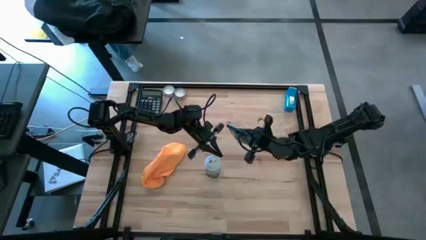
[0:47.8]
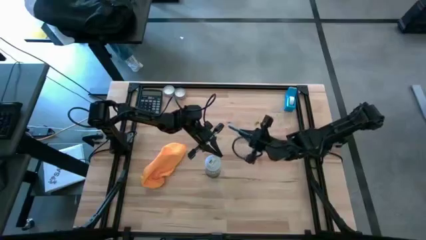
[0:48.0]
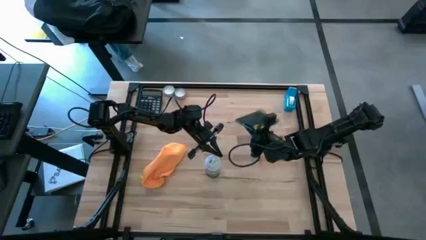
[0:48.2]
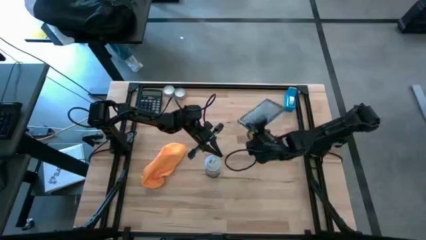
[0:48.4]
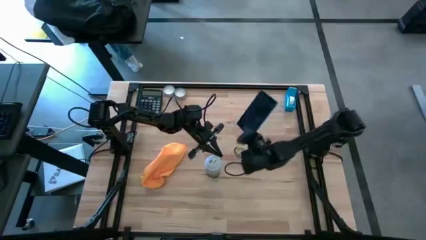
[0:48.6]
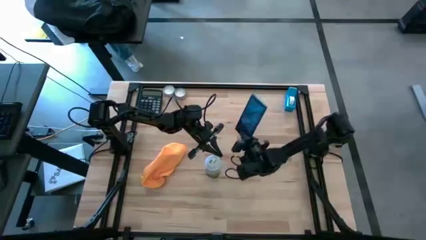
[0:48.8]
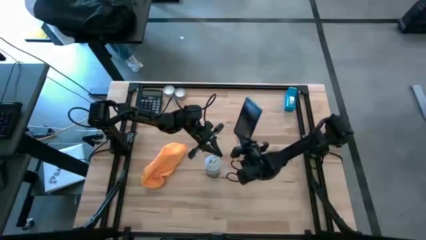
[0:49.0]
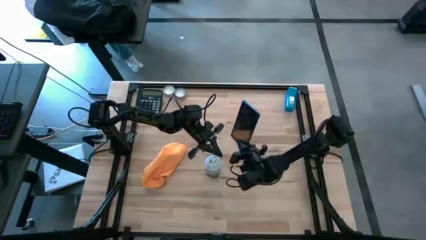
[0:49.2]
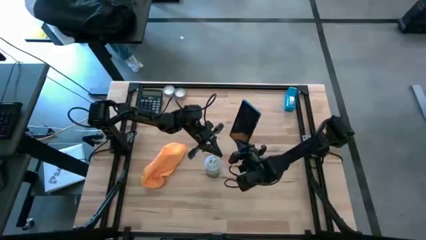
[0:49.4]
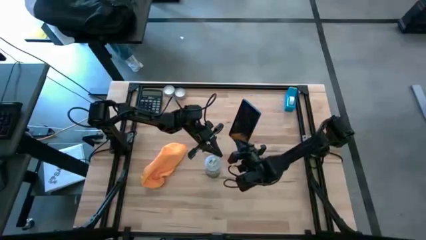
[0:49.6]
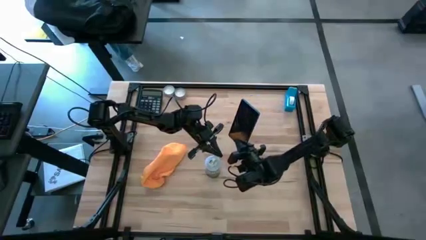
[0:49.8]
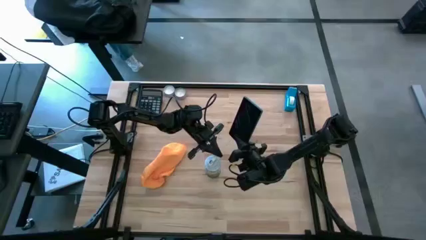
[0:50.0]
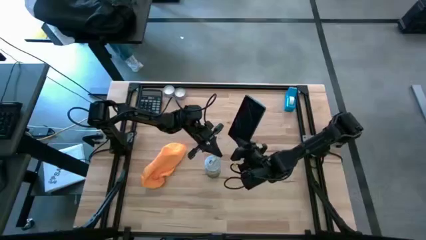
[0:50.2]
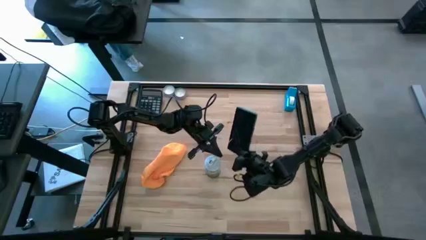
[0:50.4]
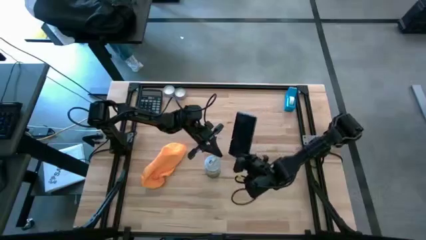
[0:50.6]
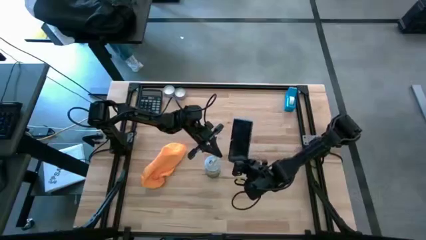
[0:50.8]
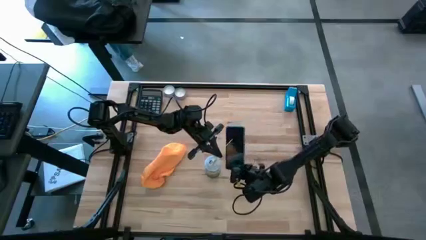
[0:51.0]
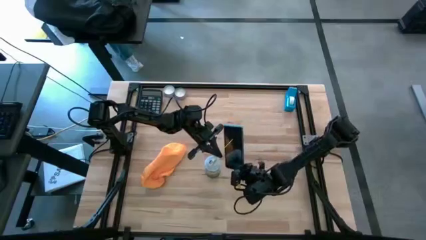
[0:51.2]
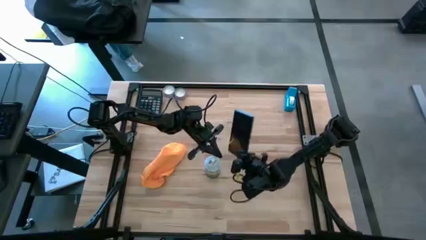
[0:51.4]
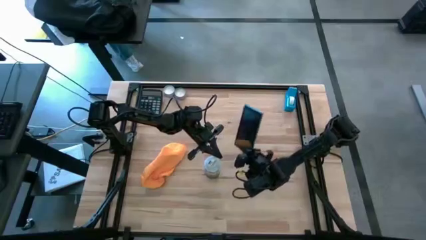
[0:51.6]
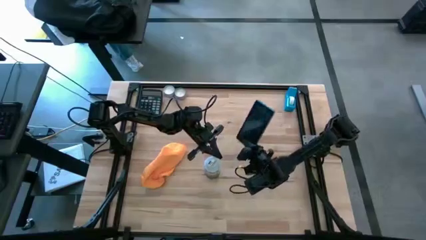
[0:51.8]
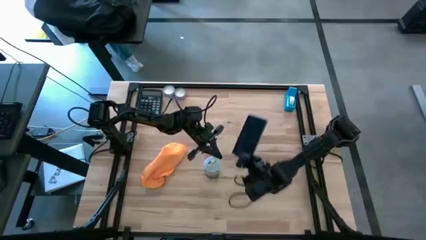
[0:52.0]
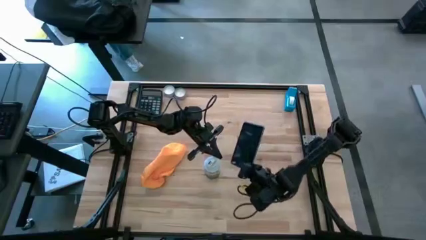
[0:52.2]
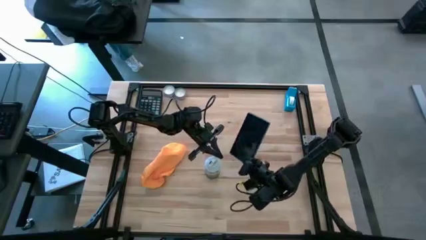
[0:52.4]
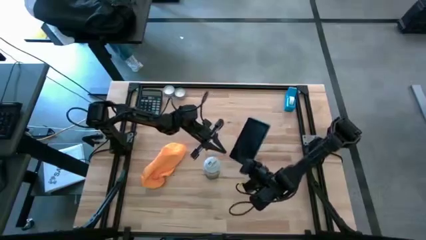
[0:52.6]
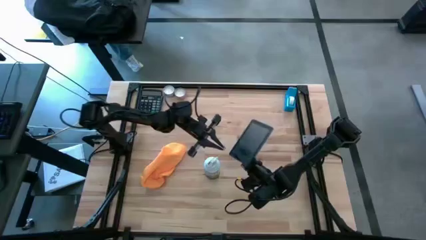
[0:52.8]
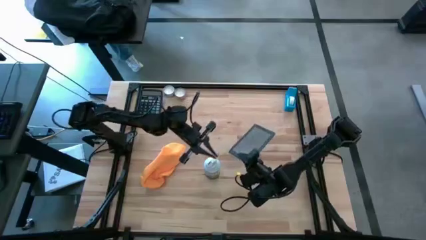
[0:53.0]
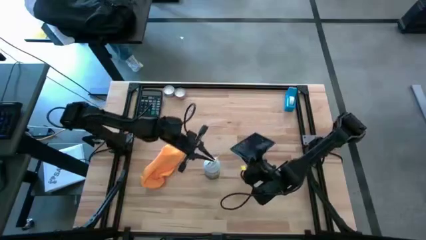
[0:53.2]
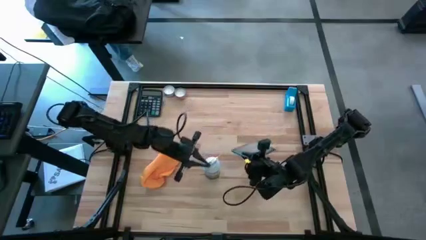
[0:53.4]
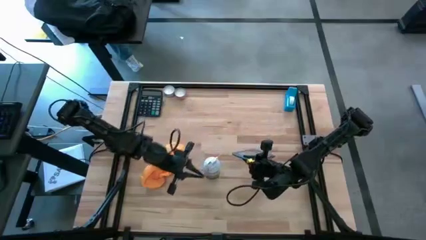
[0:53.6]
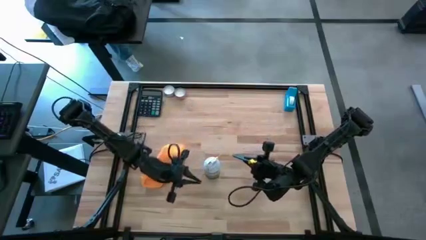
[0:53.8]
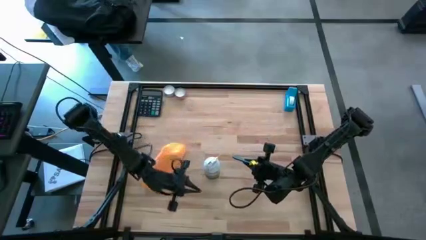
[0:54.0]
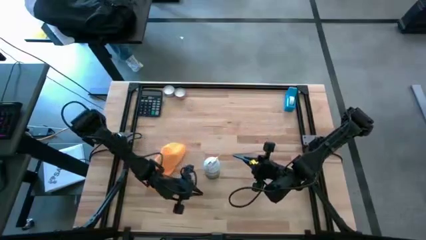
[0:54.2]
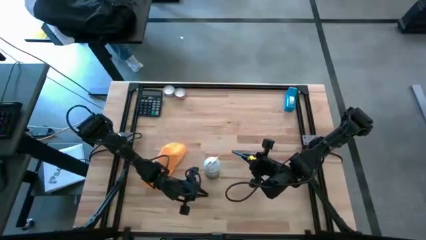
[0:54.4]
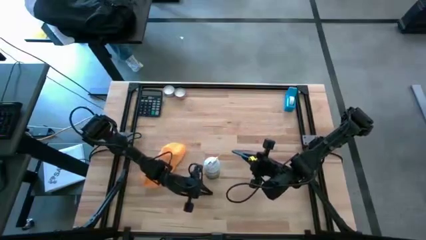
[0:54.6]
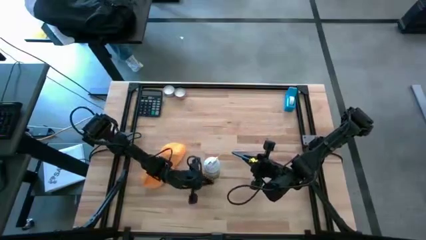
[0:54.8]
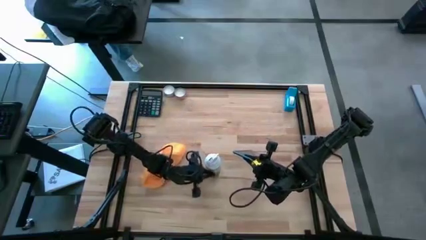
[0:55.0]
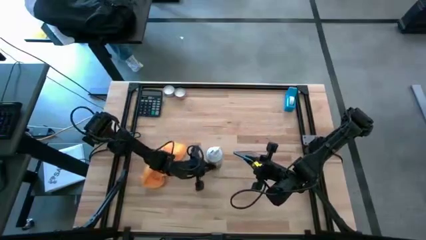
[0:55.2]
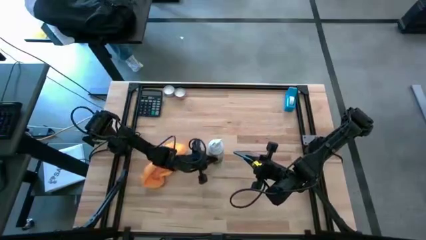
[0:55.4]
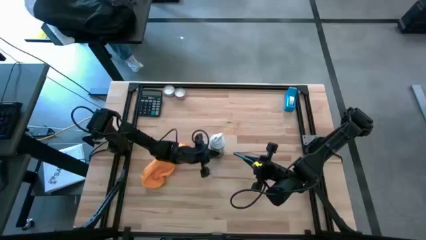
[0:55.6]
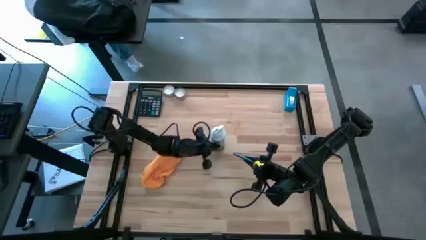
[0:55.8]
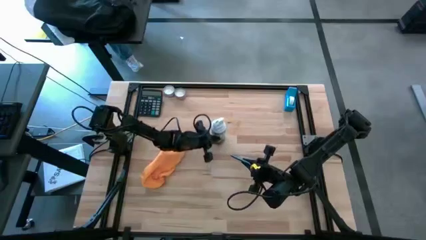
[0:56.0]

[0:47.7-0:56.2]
Task: Apply microfiber cloth
Spray the front of the blue tablet using the white spray bottle

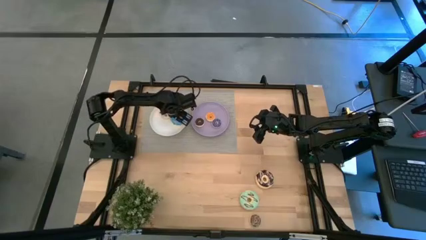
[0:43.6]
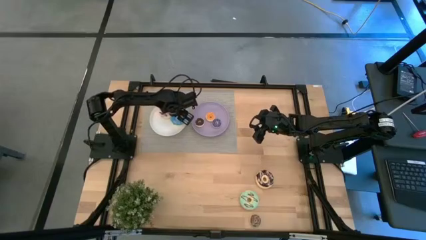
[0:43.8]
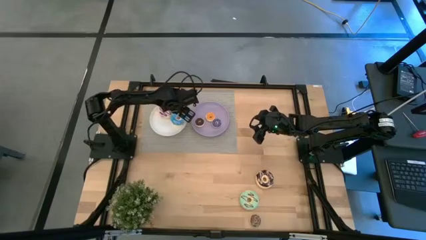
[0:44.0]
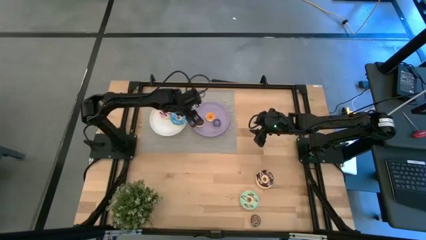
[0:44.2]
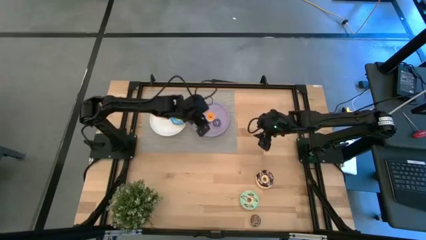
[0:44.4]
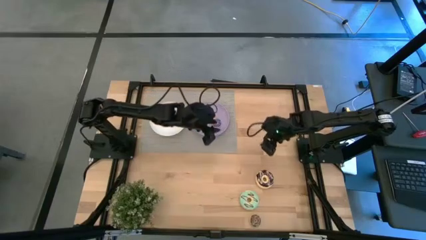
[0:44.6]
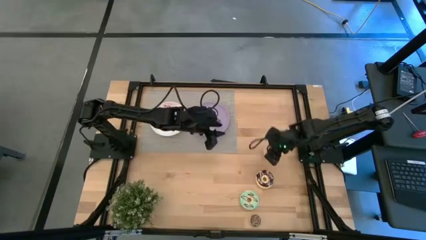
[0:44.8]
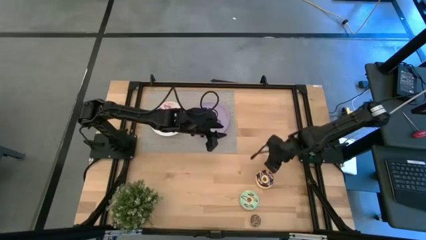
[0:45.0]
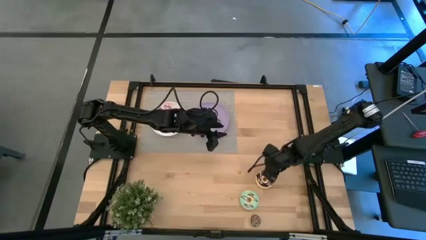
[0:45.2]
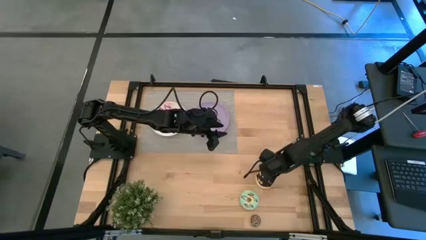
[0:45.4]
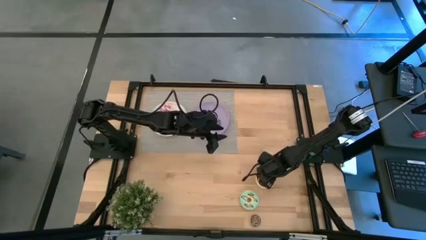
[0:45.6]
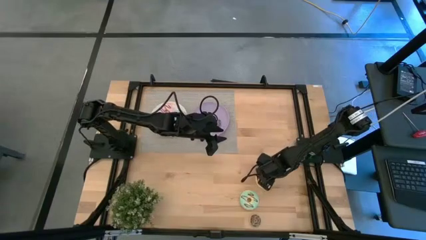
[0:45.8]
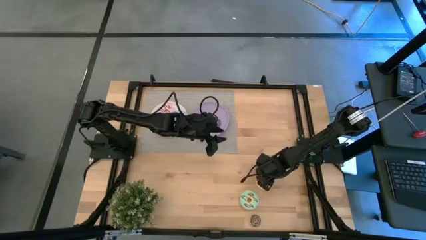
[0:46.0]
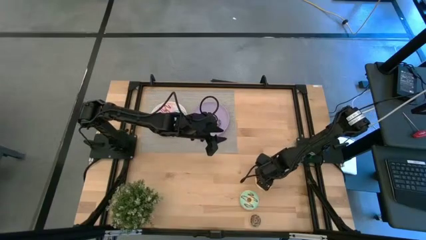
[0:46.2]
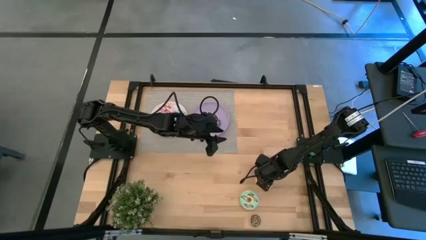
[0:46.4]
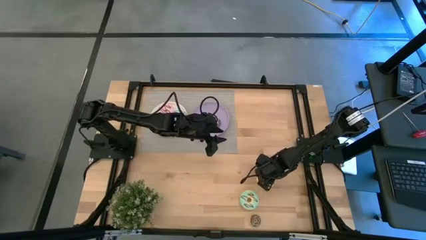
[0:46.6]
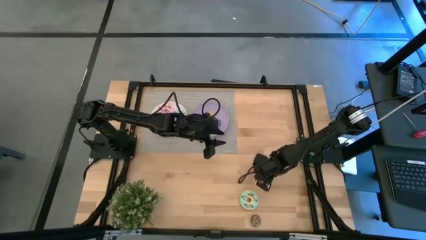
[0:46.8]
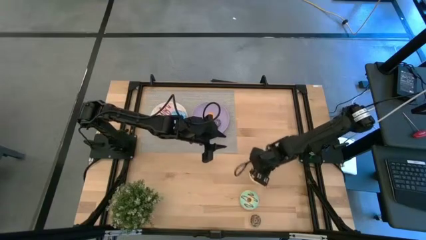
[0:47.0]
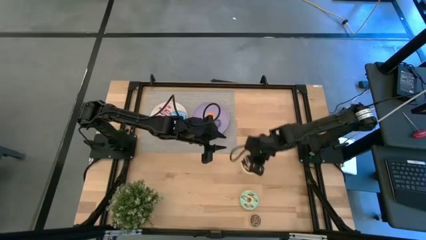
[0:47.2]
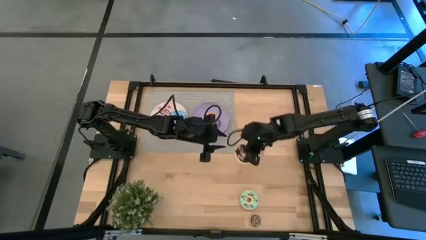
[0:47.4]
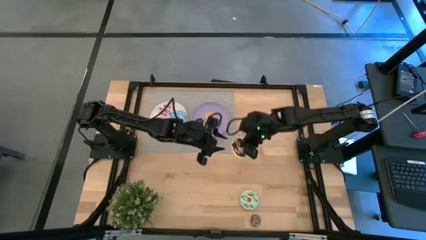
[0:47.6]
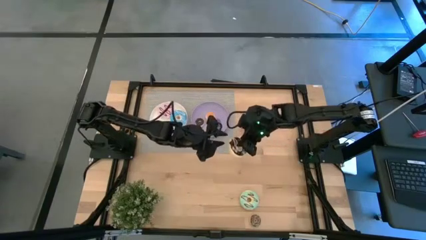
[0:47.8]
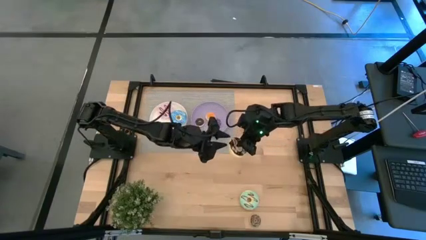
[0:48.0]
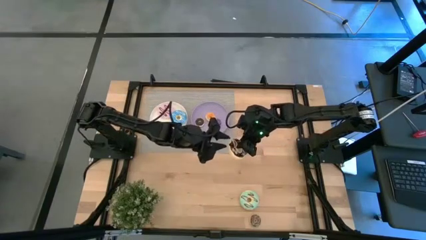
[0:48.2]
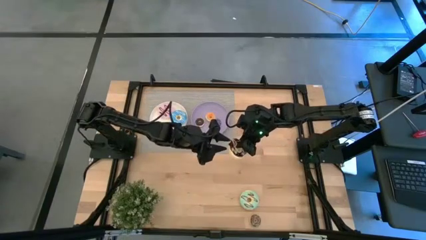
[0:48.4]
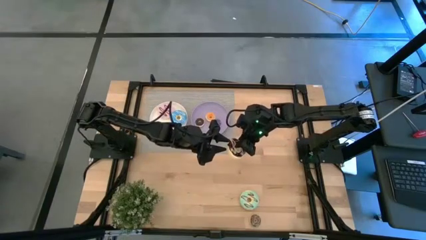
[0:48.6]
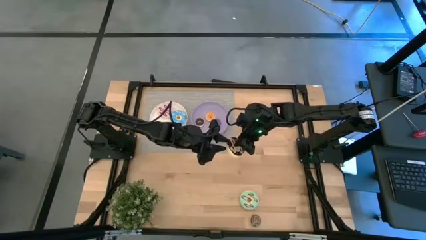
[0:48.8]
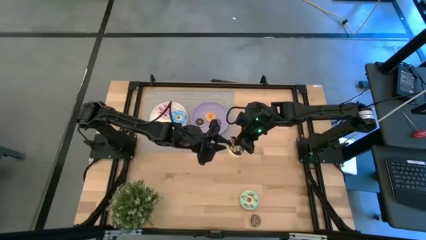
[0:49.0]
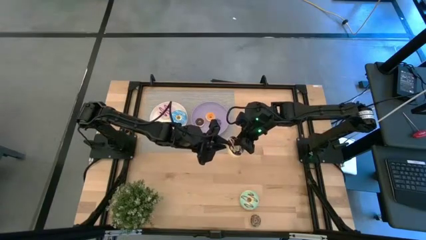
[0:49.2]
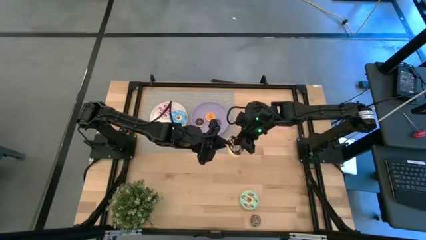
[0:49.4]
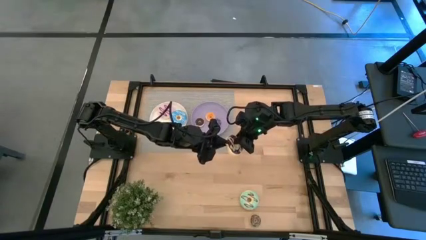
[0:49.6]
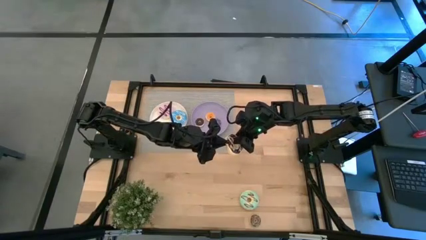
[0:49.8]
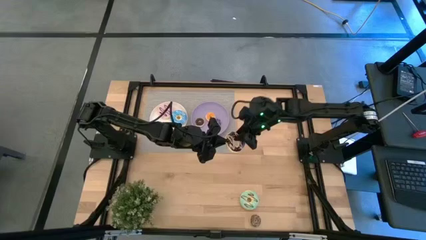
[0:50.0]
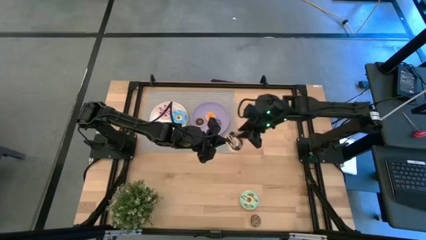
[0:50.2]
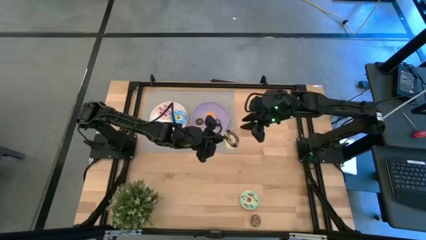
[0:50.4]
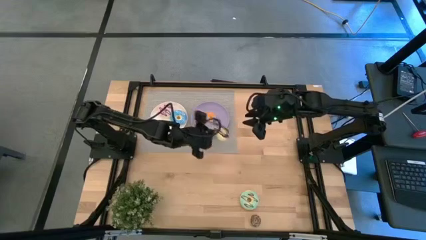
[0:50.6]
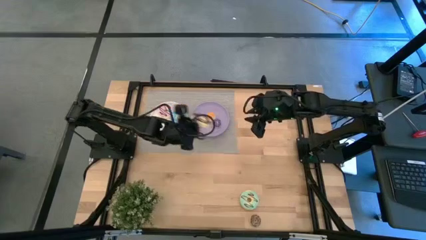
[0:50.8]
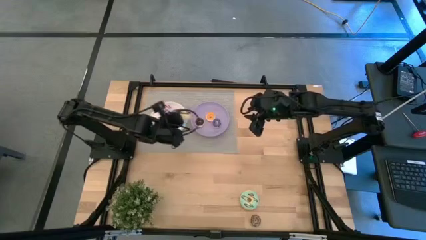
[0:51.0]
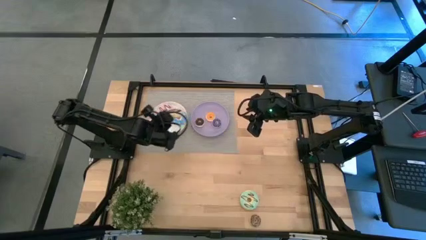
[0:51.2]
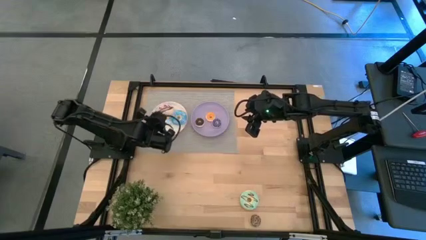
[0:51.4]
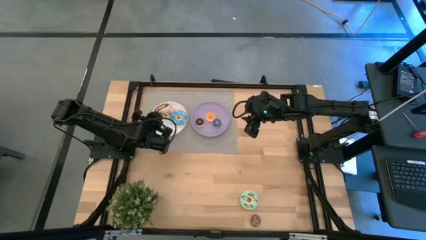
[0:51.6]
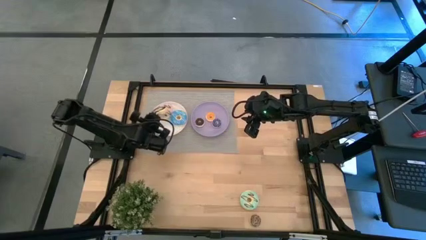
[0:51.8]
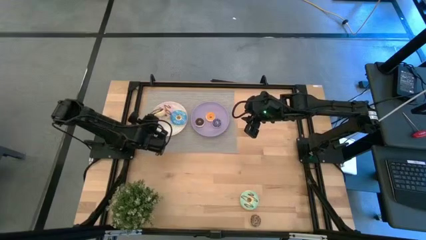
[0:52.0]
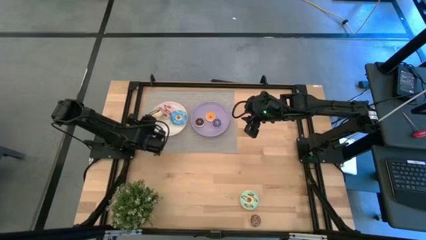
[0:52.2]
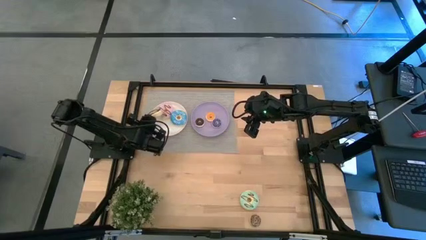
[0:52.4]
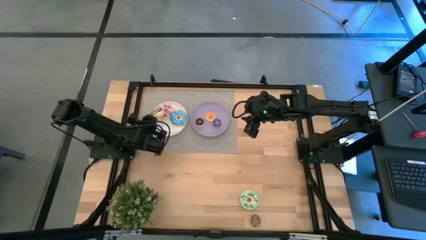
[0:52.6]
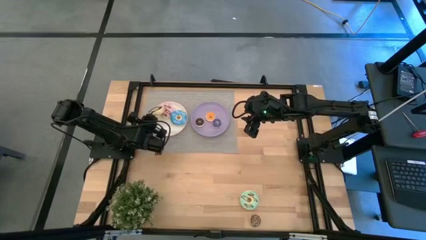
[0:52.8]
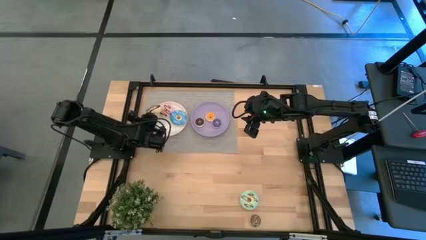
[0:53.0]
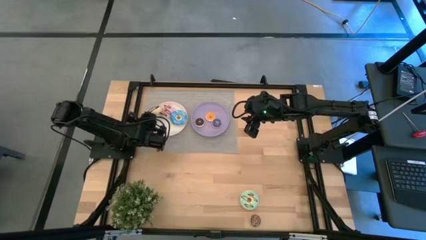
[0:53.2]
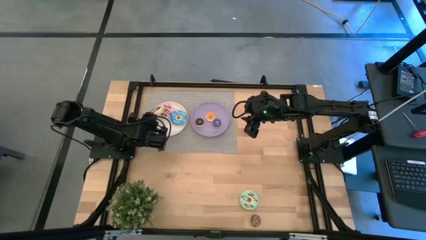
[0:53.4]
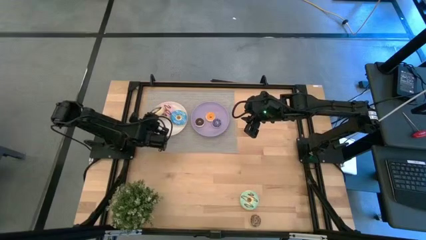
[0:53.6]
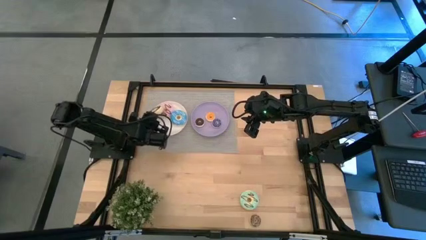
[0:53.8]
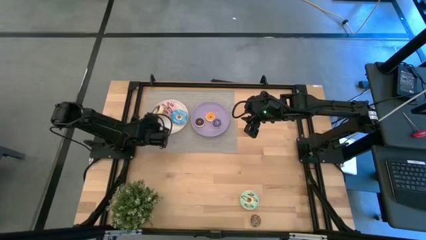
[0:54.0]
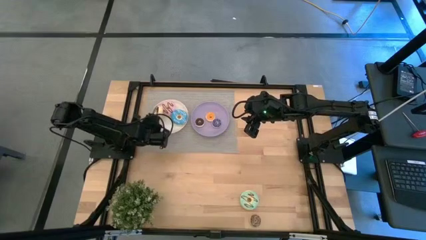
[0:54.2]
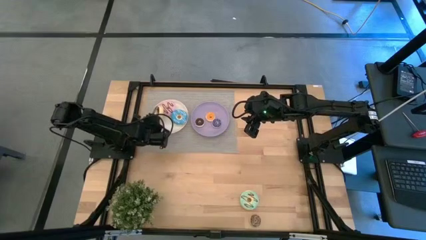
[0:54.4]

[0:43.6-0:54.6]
Task: Pick & Place donuts
Put the large black donut on the white plate
